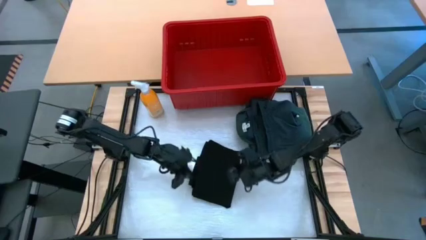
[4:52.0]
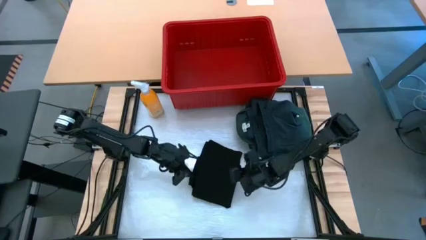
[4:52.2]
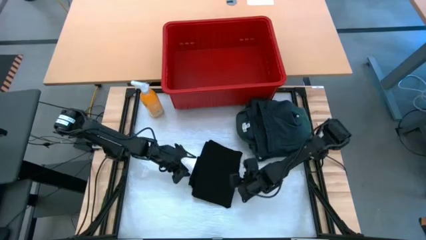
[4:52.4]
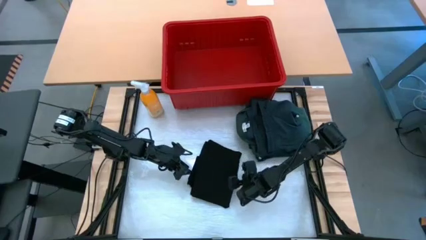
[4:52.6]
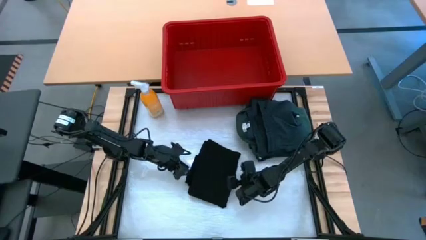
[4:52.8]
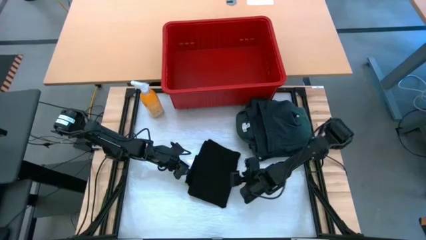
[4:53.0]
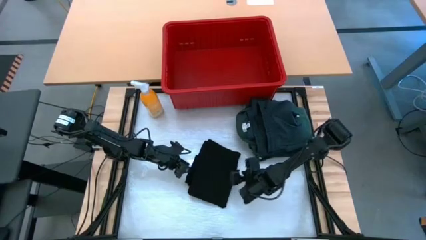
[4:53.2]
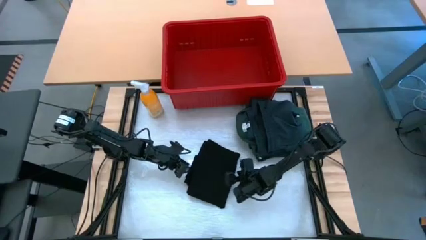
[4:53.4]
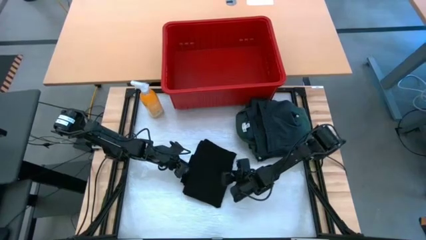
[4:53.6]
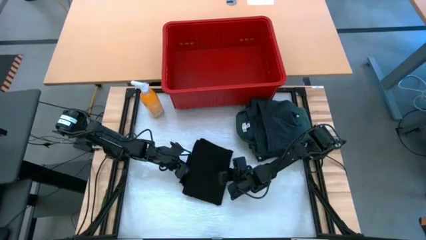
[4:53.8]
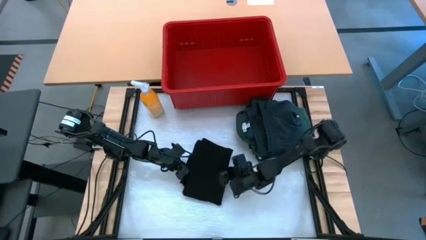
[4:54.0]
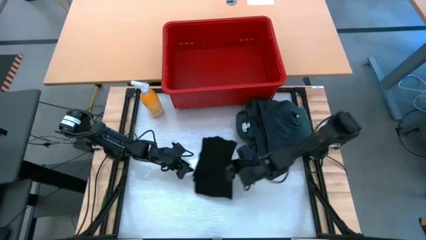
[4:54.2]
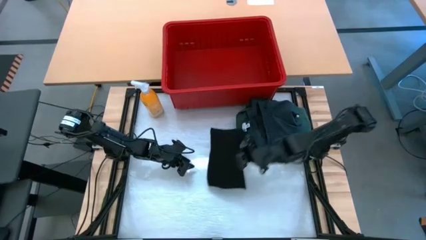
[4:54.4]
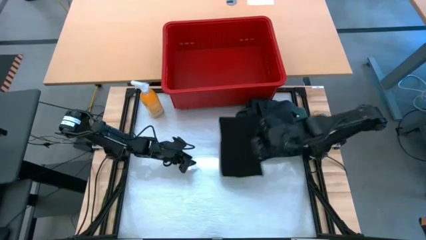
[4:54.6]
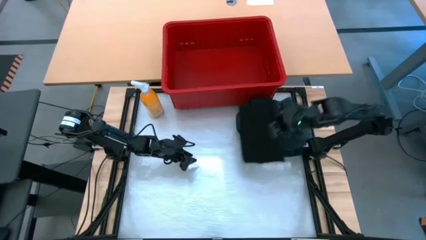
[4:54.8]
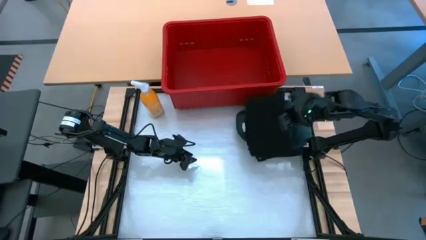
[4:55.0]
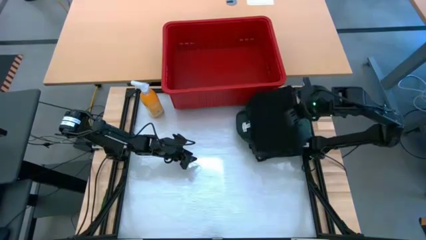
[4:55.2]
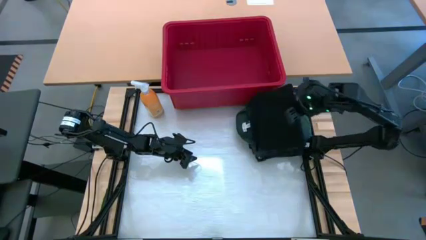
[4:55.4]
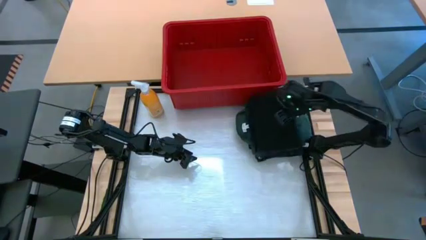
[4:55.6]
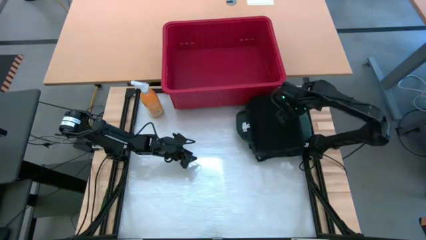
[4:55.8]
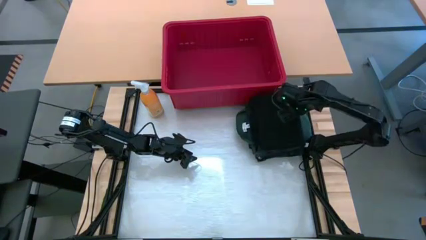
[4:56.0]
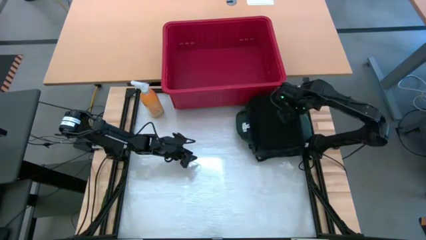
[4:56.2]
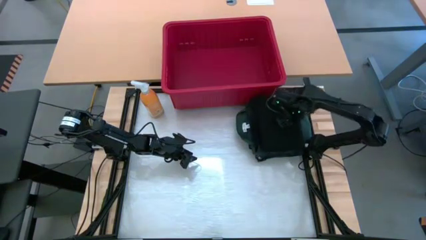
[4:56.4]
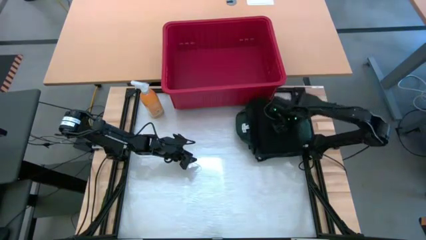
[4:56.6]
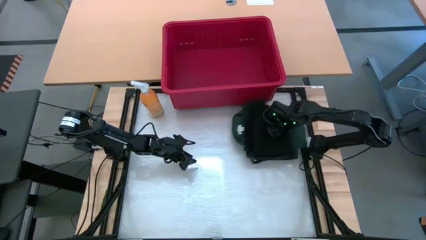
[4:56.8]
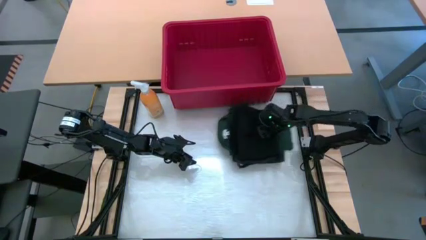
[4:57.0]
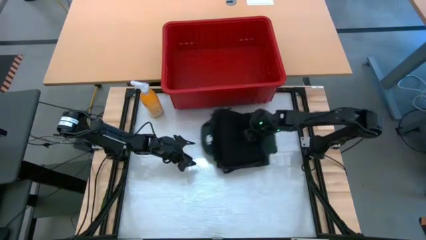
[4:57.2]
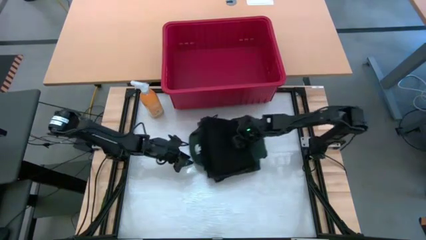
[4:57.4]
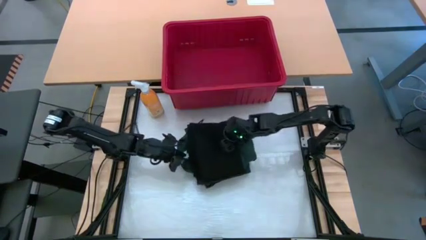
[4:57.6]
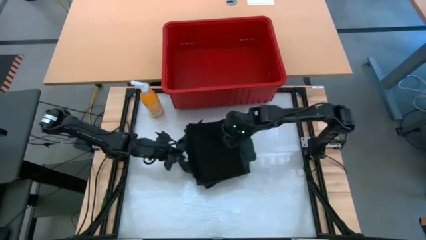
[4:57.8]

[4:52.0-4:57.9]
Task: Fold Laundry from Bin
Stack the black shirt on top of the dark blue shorts

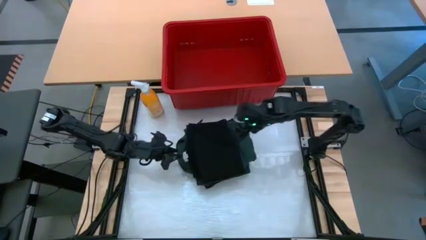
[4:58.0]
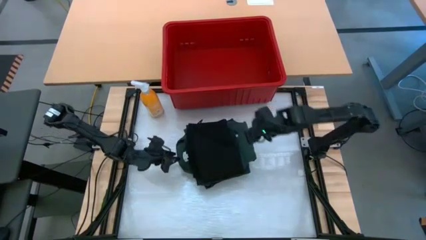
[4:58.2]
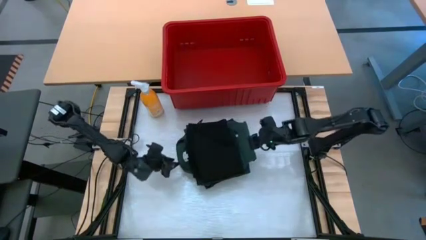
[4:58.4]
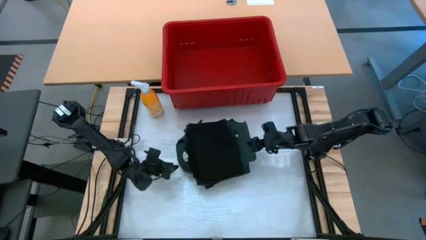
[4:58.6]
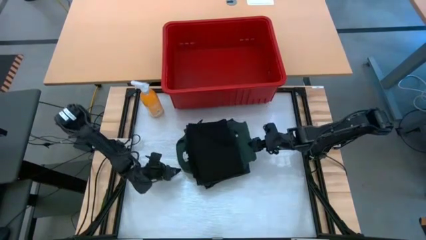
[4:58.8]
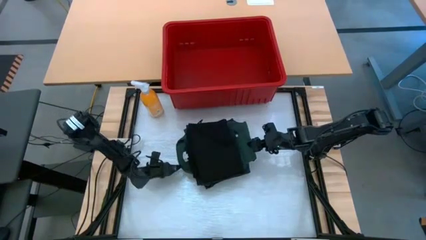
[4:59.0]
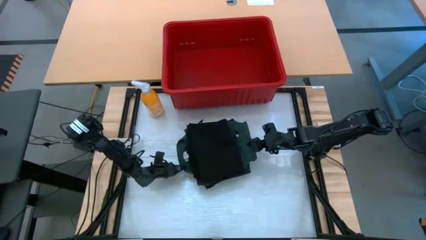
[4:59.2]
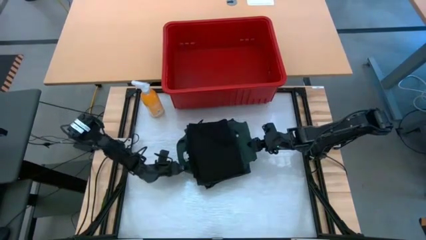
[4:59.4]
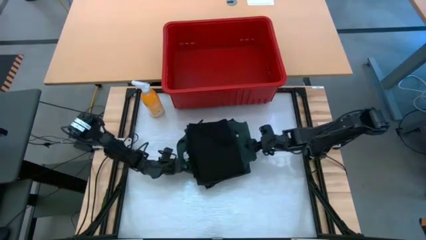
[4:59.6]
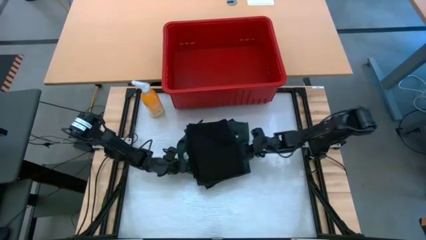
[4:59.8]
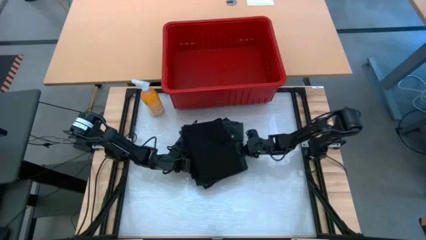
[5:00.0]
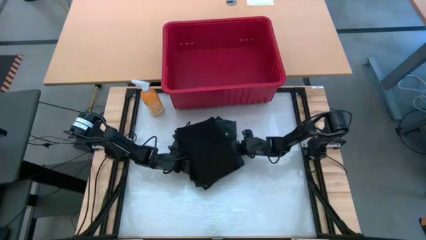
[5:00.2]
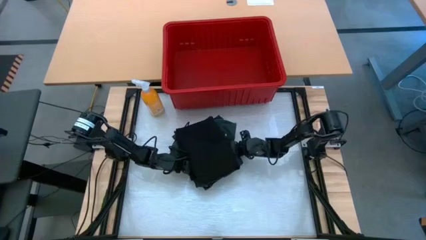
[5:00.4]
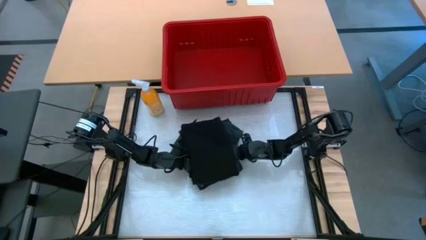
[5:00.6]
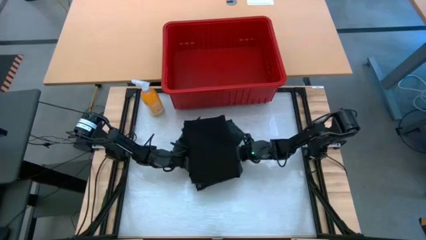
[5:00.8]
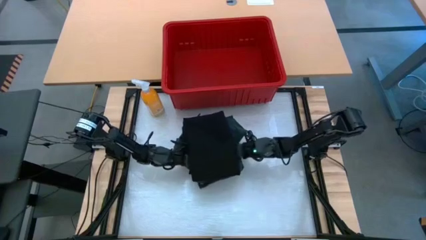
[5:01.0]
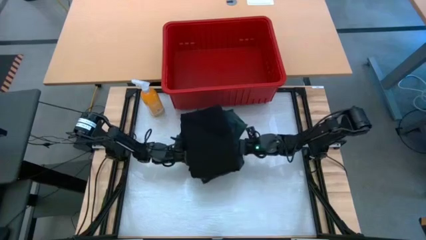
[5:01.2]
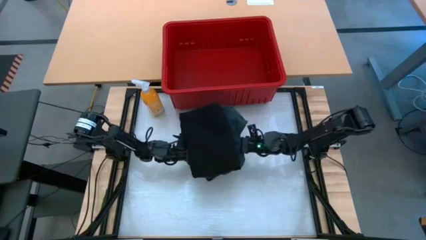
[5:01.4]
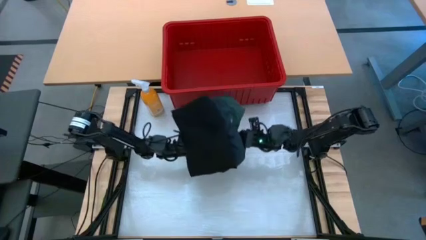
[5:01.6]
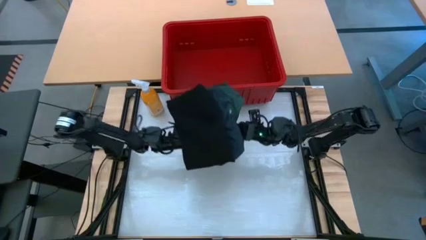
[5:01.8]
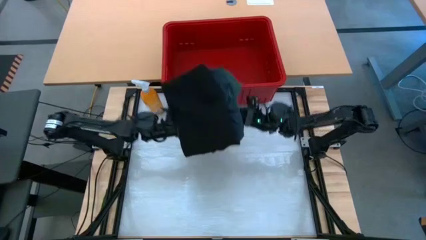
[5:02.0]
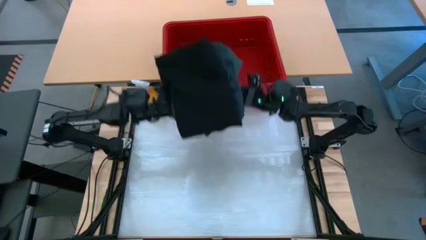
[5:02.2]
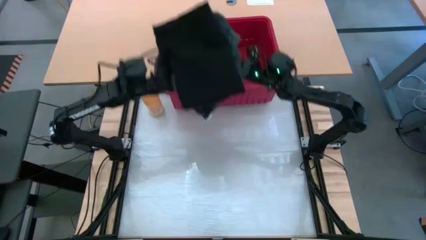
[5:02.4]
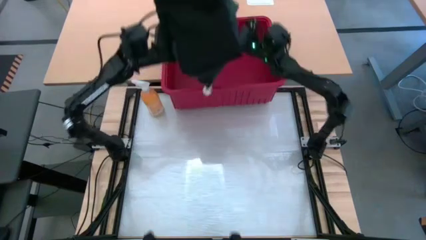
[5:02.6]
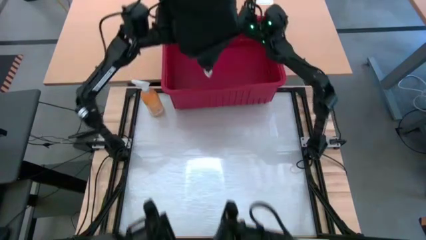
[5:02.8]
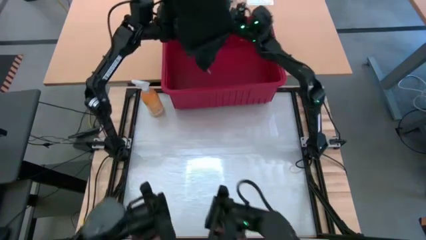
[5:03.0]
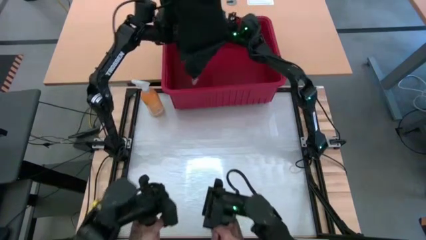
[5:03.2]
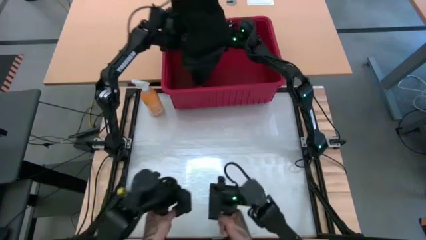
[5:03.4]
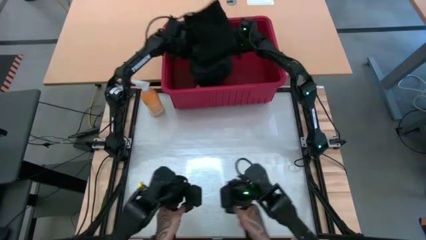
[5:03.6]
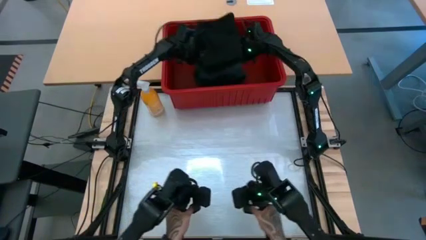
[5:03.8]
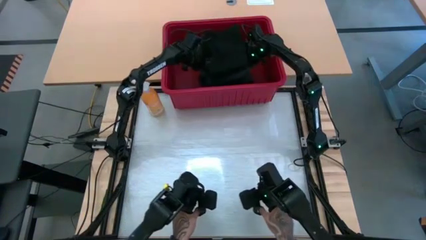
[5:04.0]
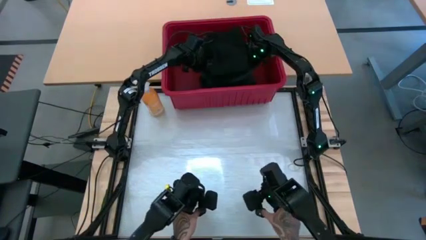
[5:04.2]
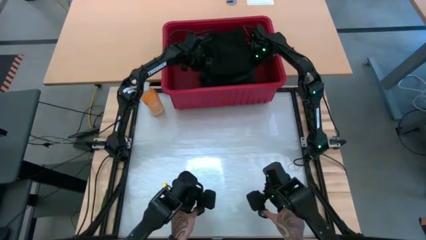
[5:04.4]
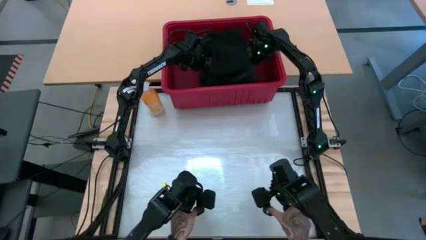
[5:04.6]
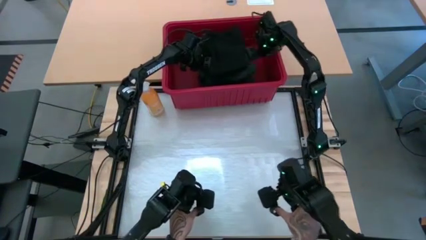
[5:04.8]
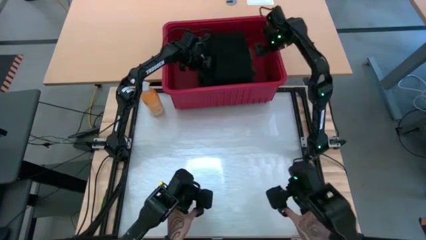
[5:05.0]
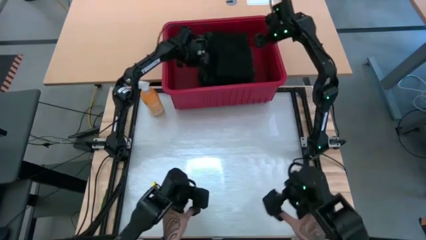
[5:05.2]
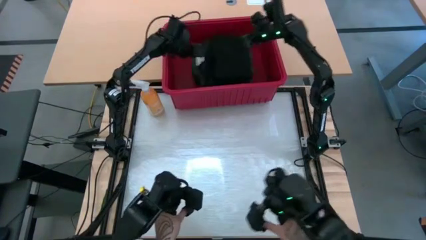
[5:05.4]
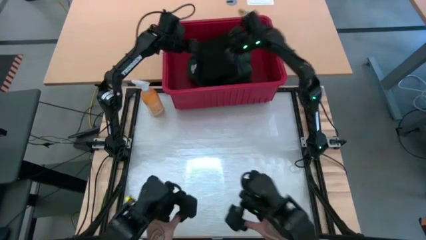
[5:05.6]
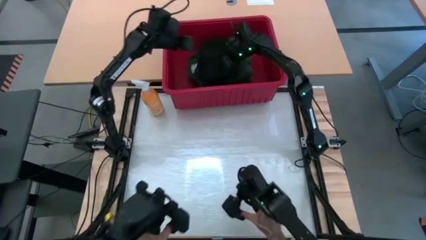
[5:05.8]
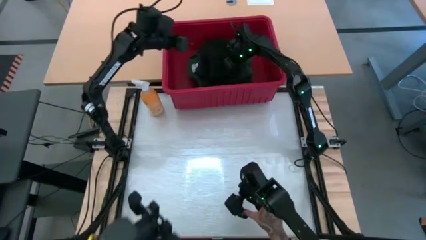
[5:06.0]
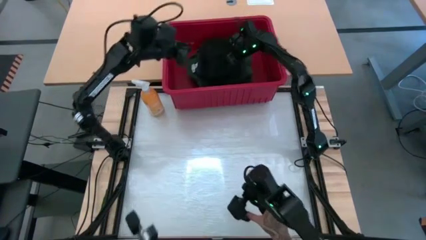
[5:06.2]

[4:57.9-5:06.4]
Put the clothes into the red bin

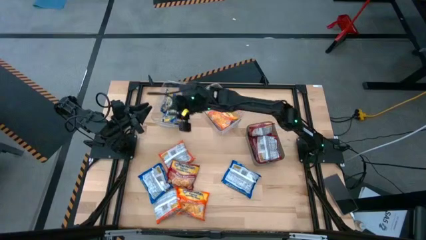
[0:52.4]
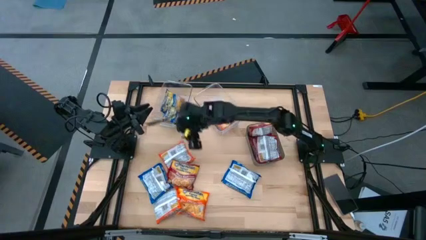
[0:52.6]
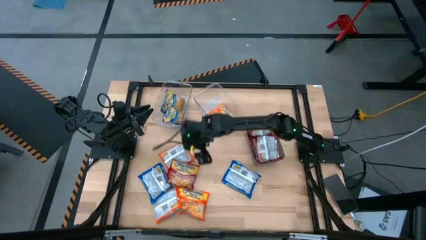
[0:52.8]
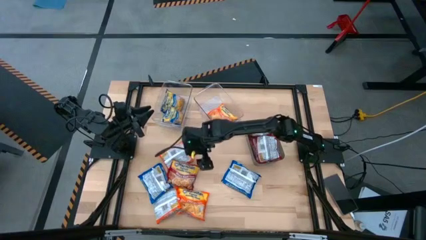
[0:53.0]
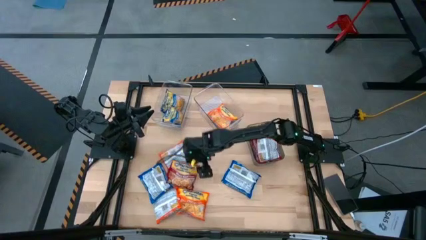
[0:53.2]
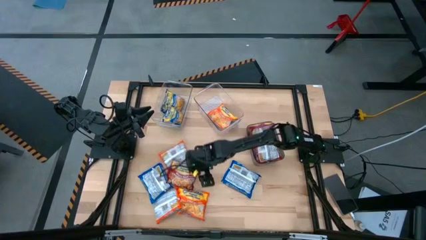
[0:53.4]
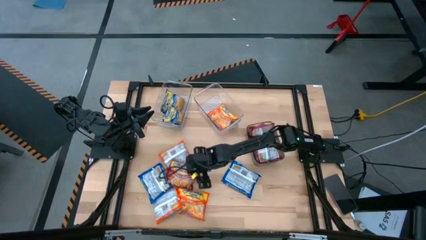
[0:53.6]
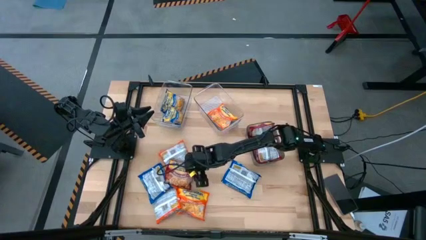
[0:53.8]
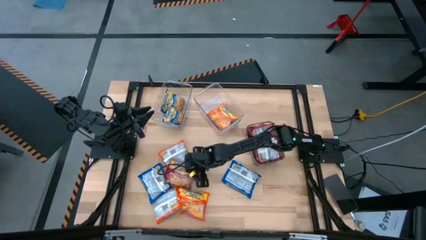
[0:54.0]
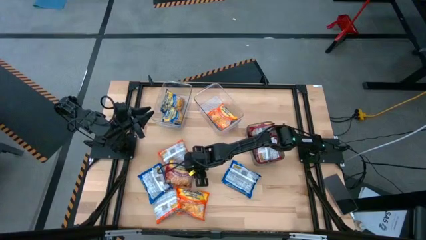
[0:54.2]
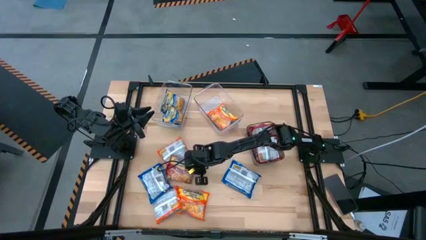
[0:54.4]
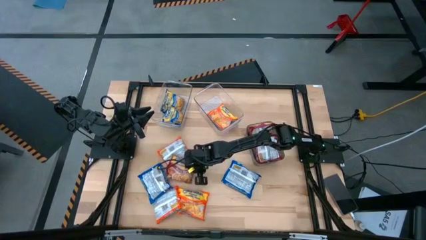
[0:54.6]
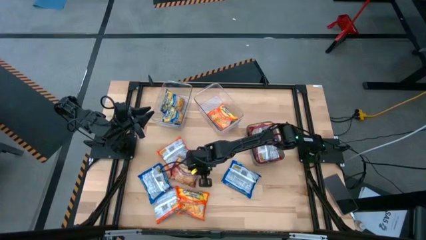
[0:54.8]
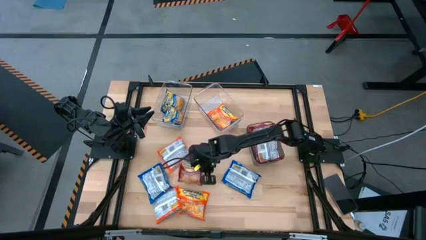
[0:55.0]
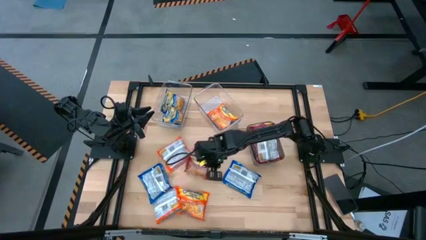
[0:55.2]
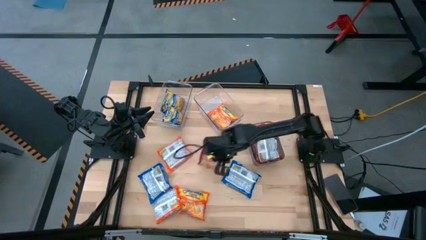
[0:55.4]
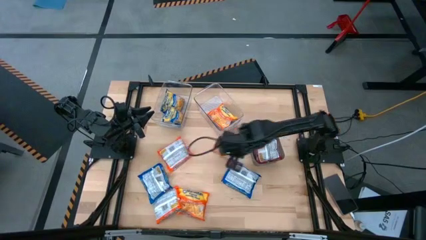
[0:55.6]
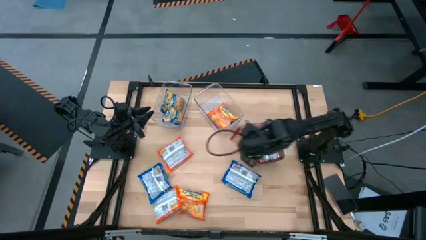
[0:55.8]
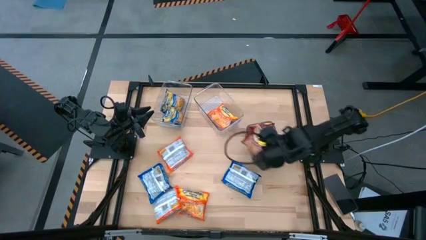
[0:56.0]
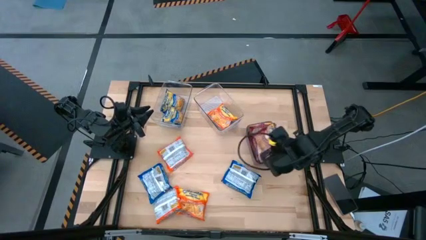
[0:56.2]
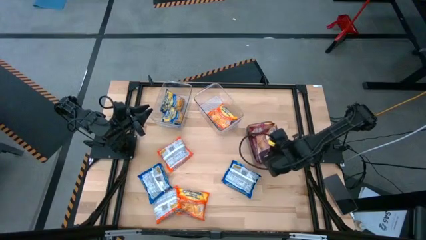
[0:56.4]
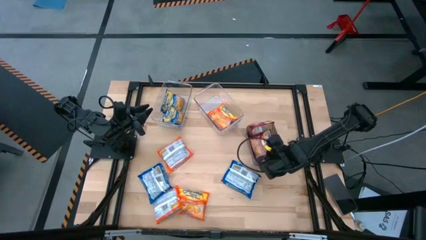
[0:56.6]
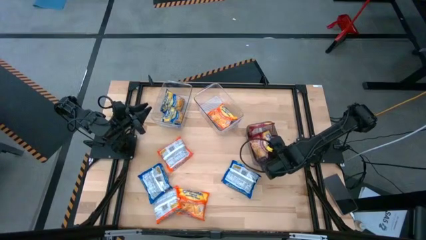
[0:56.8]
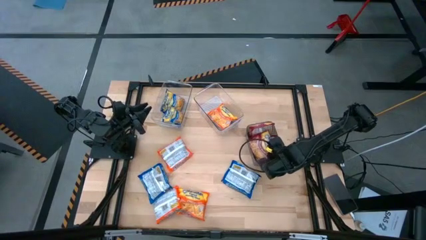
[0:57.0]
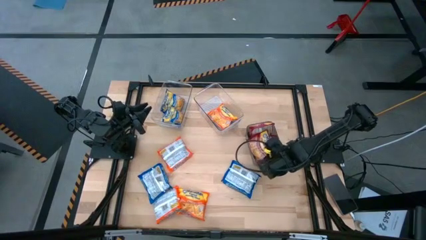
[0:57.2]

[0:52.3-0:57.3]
Task: Sort Maruchan noodles
Put the red noodle pack into the black bin
